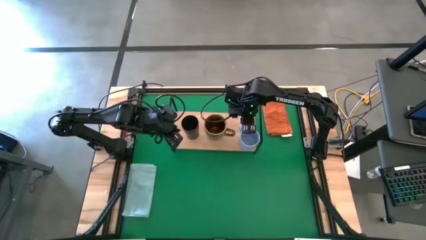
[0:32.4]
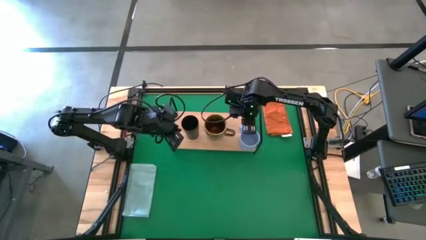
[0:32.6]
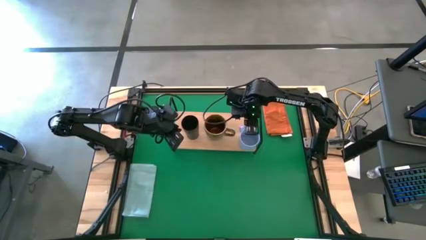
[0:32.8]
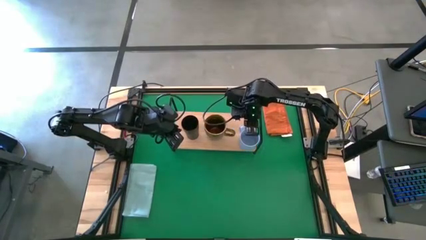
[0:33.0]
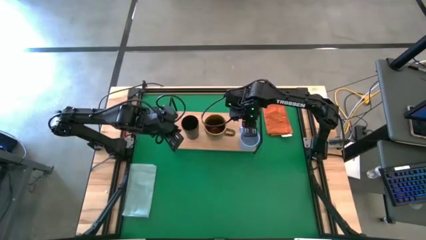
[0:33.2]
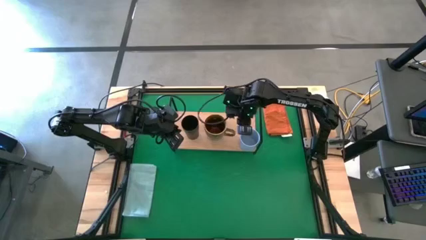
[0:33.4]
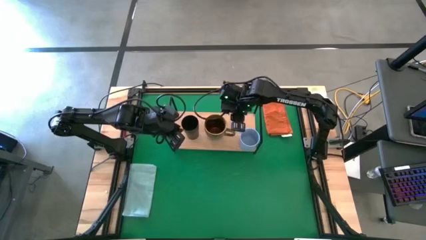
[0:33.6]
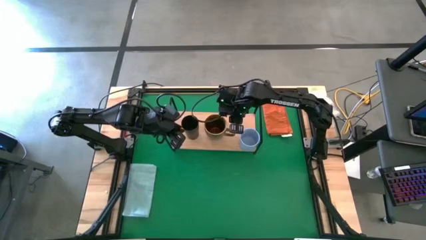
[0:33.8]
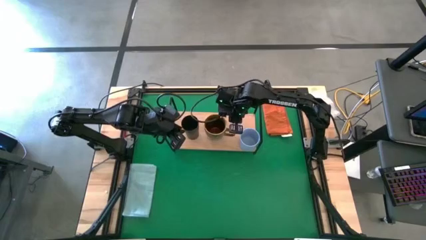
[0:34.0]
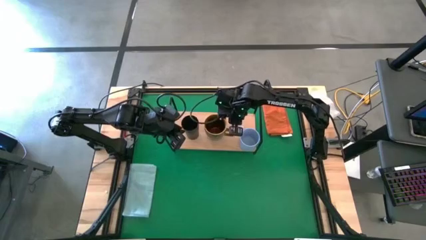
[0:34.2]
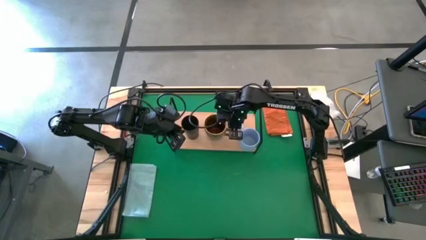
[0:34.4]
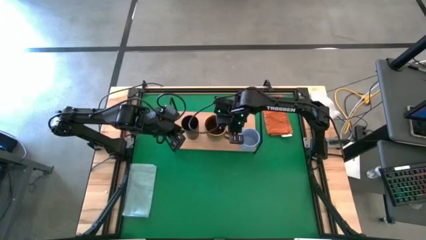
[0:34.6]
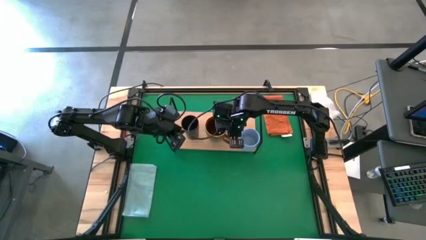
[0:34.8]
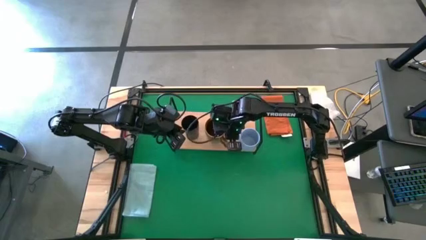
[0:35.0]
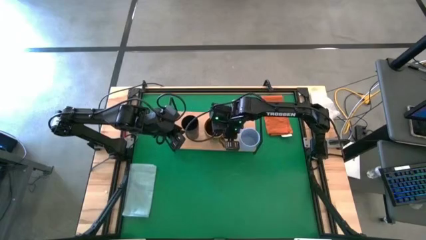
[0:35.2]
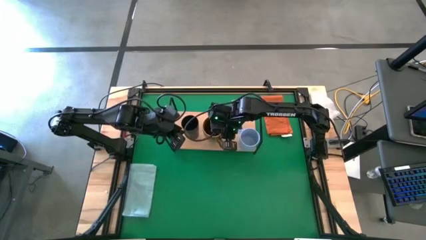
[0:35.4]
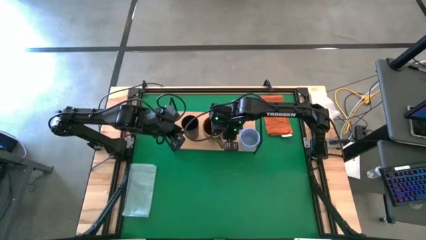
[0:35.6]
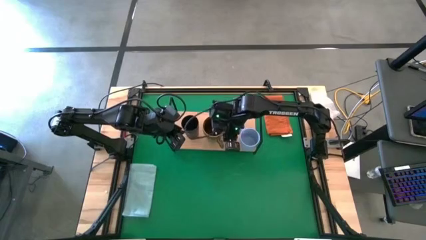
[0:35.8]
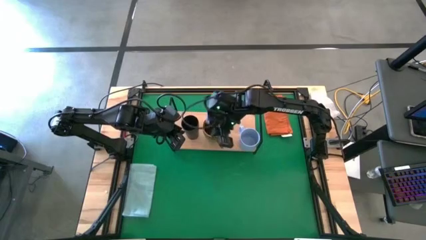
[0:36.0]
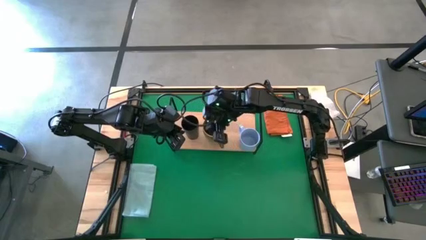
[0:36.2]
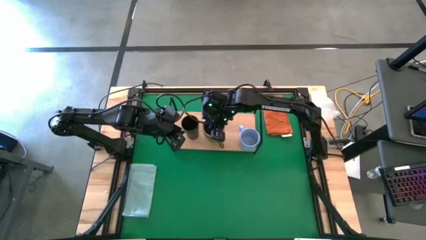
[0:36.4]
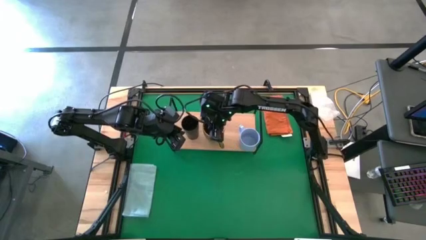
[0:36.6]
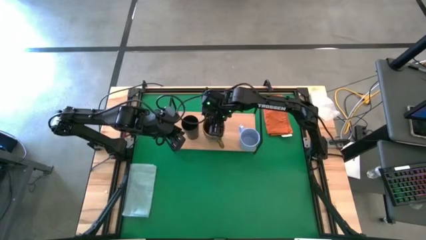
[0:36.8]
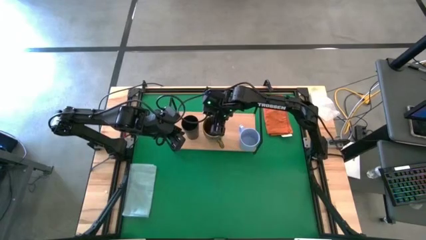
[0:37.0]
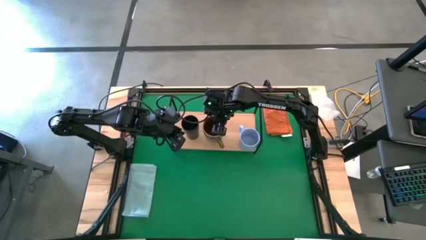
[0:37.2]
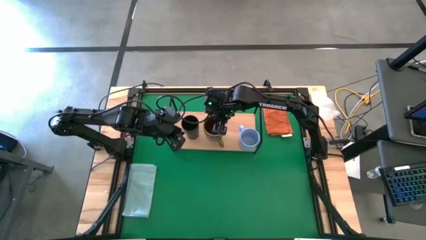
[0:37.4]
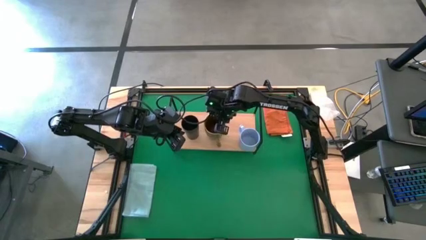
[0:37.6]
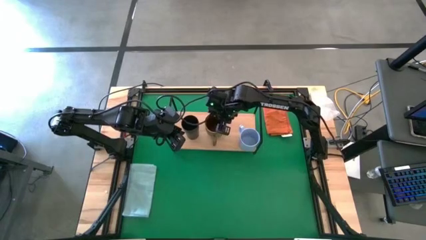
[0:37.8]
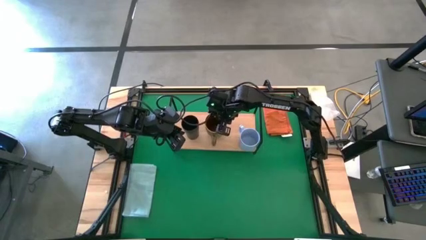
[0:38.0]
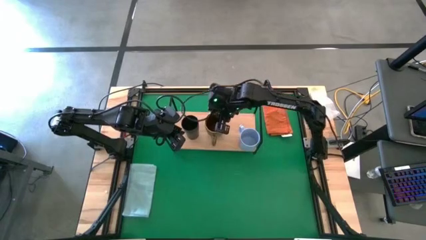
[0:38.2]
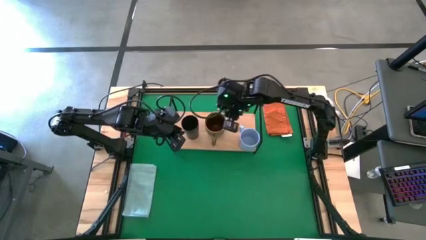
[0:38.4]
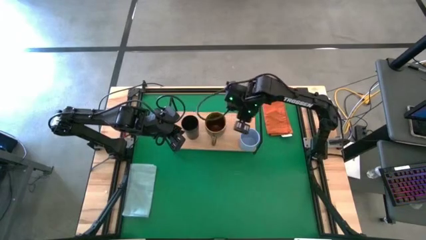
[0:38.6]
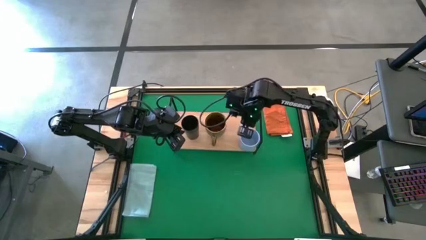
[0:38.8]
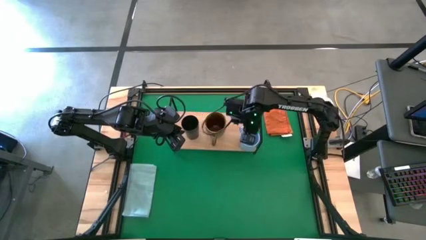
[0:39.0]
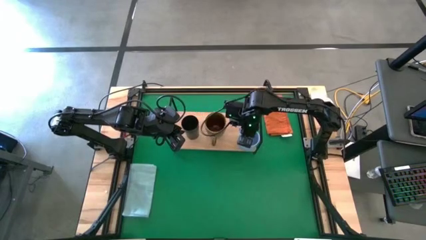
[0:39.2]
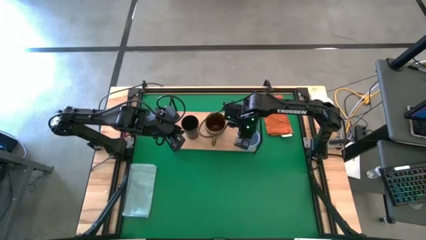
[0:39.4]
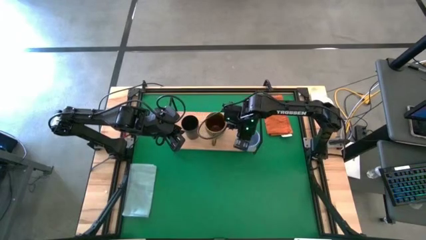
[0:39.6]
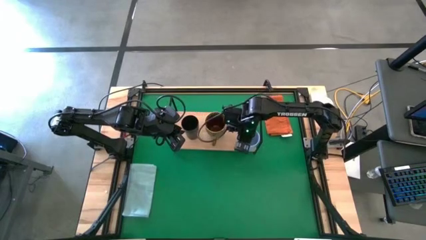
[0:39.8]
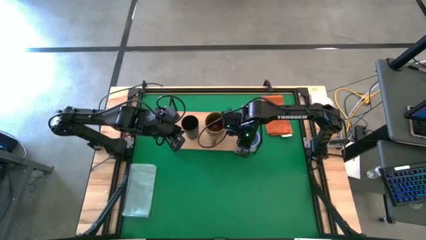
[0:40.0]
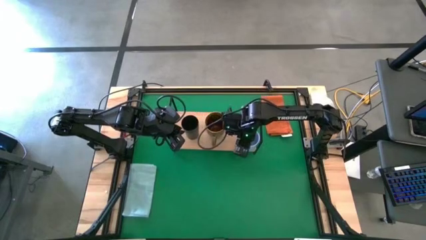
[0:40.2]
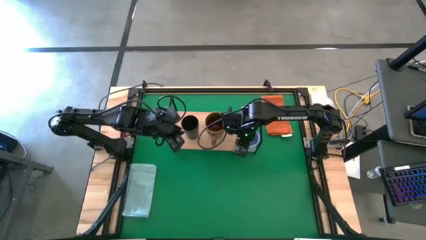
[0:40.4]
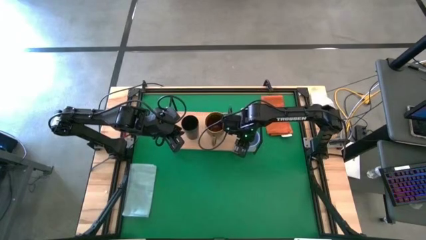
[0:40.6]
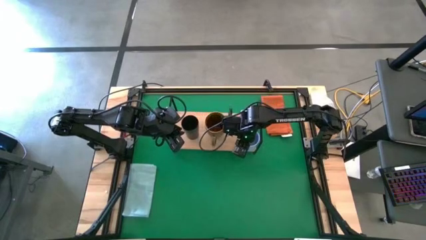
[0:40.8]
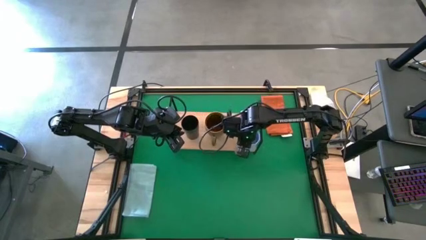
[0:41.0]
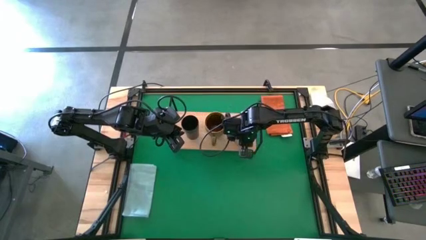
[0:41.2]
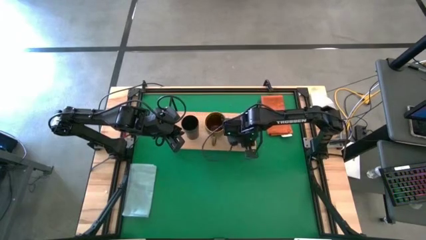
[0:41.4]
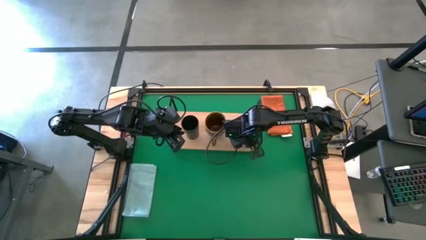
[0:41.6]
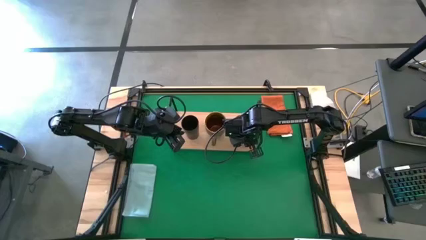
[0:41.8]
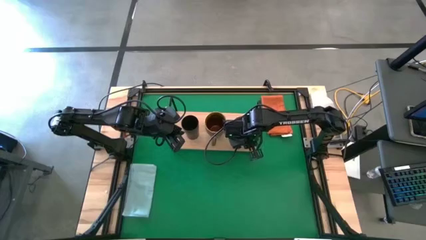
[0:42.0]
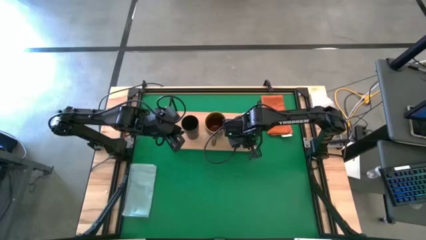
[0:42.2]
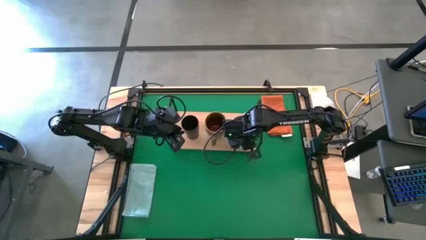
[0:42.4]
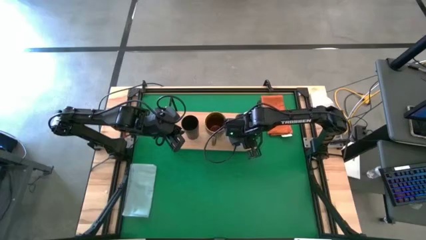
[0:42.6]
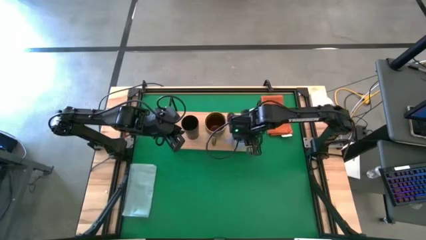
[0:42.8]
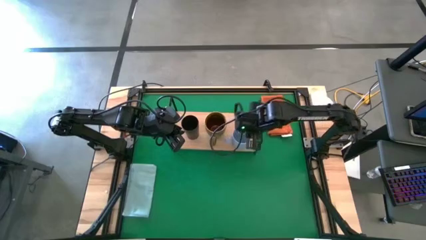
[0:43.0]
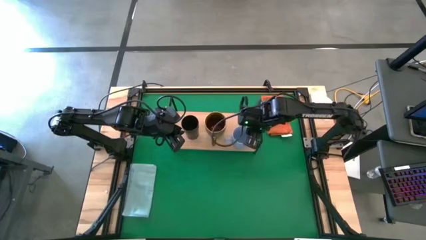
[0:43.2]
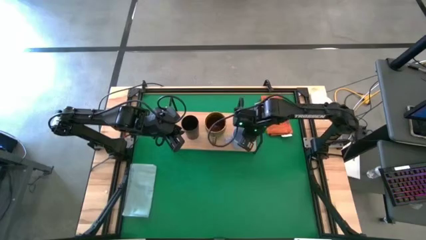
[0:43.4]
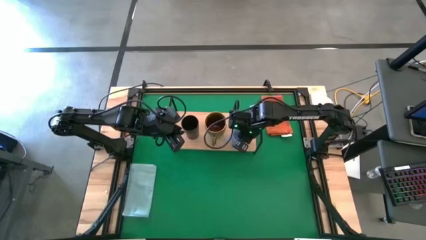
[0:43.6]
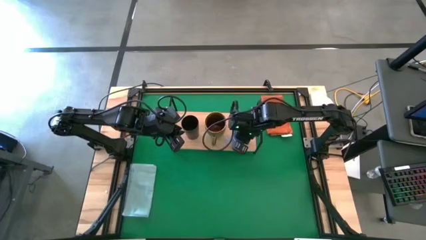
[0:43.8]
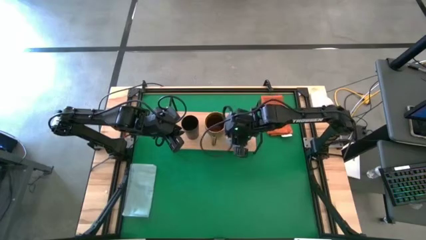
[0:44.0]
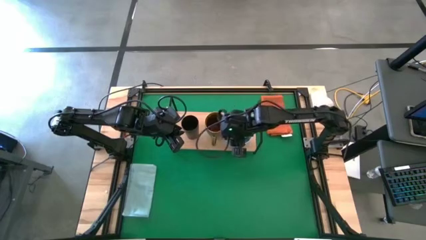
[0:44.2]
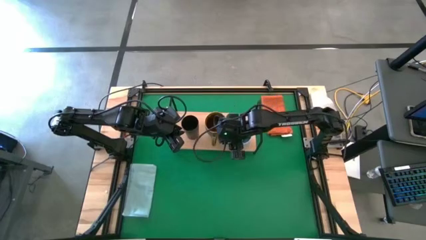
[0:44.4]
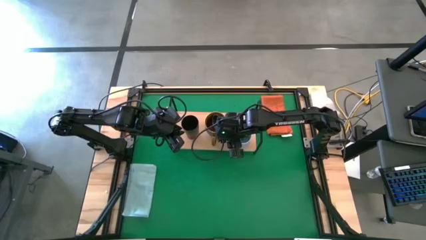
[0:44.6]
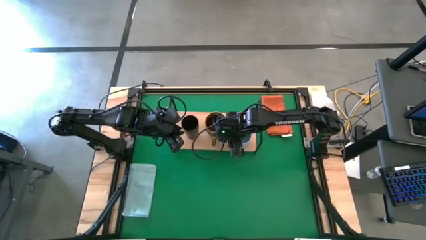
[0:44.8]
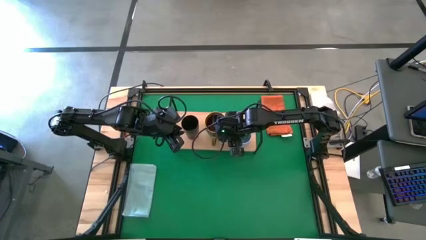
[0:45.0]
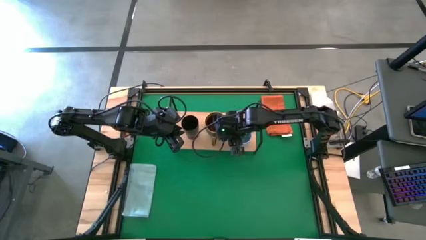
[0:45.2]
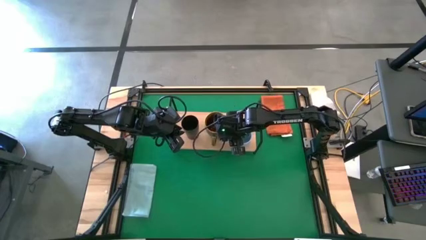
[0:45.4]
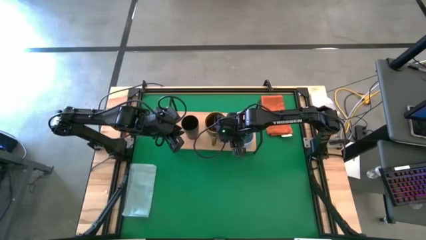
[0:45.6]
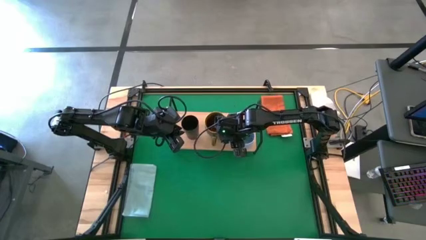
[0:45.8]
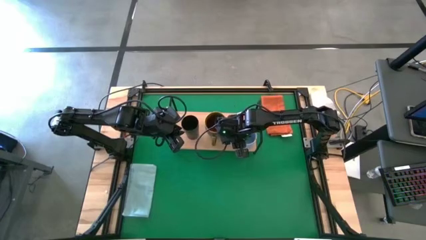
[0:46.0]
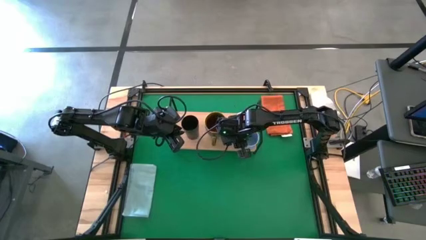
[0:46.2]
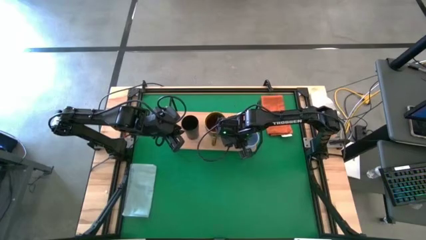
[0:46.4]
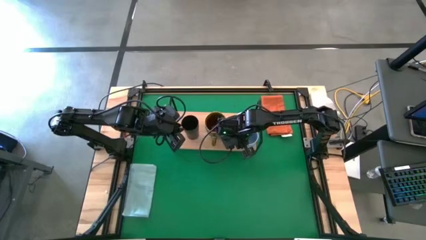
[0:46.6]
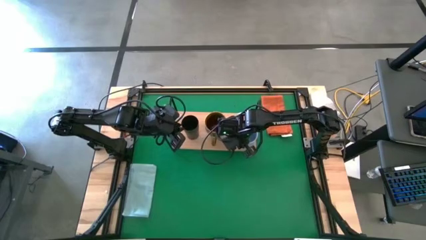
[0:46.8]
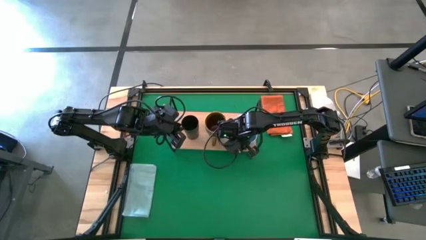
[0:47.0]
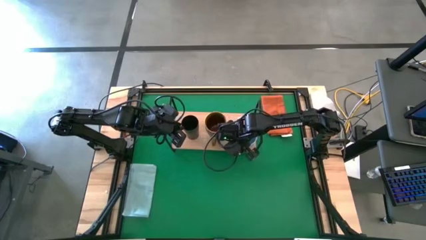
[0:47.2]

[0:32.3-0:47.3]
Task: Stack small to large cups/mugs on shelf
Adjust the mugs including the cup

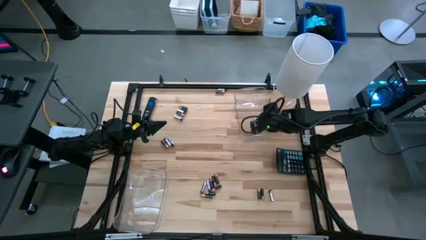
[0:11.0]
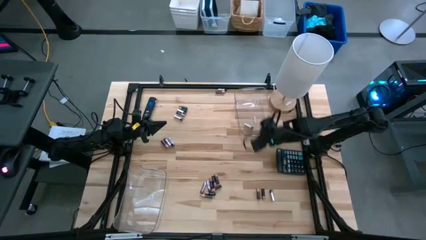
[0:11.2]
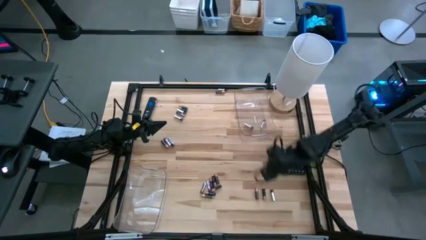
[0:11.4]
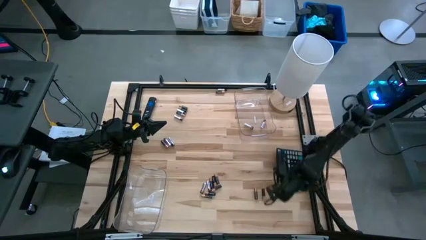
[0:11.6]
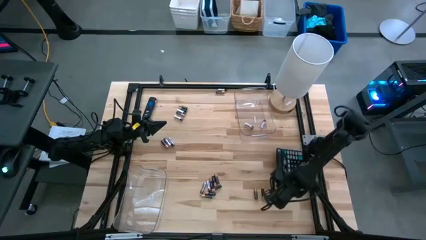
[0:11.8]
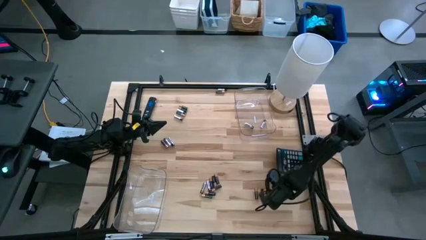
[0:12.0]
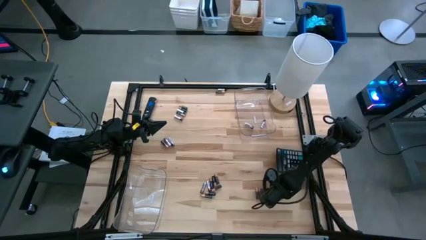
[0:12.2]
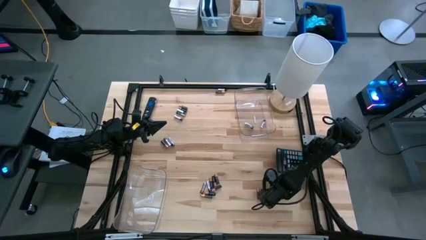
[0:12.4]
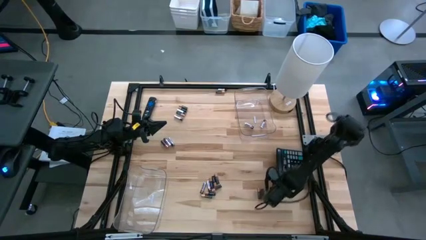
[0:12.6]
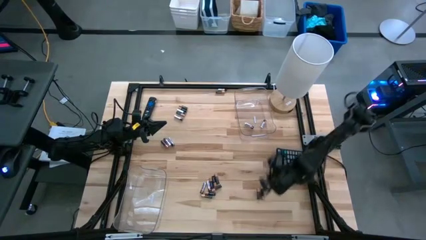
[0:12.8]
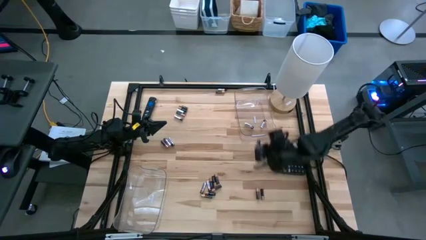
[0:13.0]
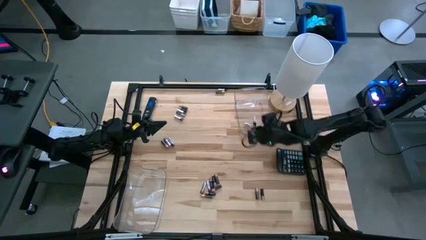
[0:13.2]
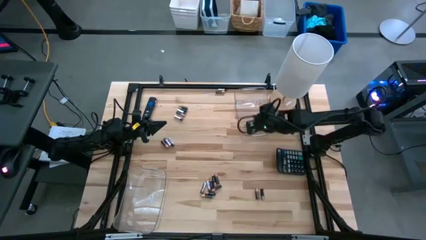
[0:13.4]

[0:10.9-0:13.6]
Task: Sort batteries
Put the silver battery into the right transparent bin
